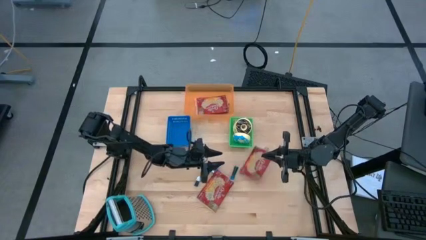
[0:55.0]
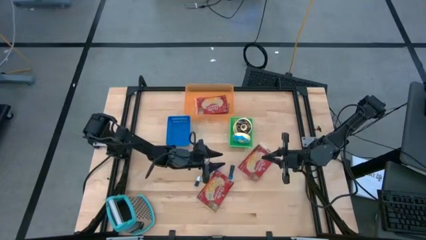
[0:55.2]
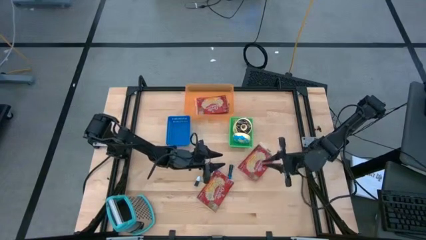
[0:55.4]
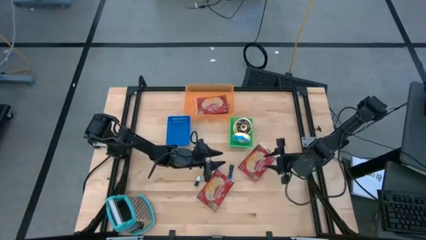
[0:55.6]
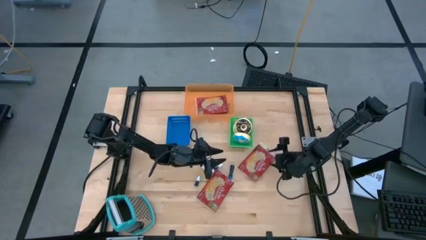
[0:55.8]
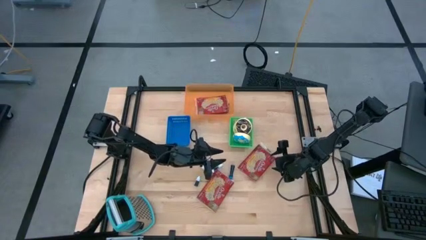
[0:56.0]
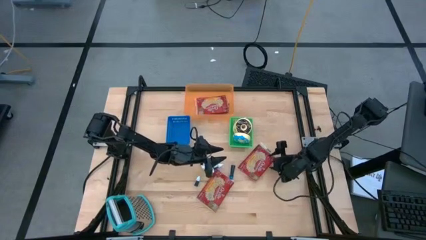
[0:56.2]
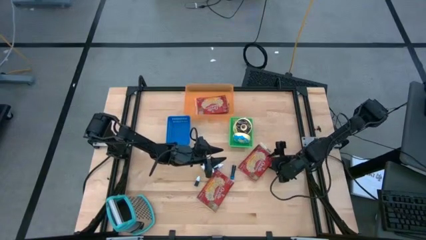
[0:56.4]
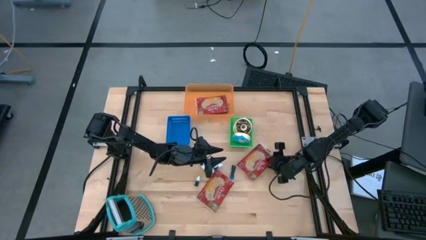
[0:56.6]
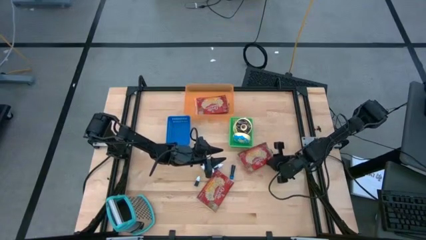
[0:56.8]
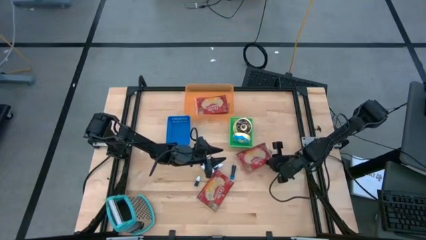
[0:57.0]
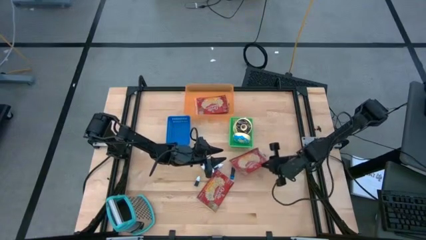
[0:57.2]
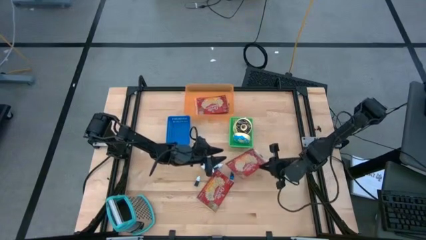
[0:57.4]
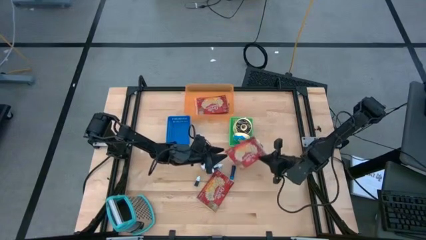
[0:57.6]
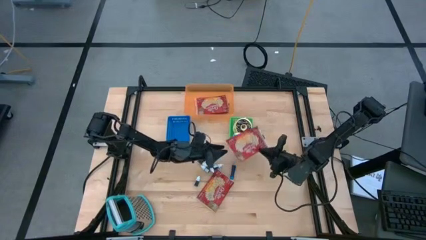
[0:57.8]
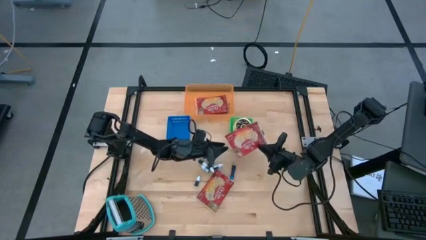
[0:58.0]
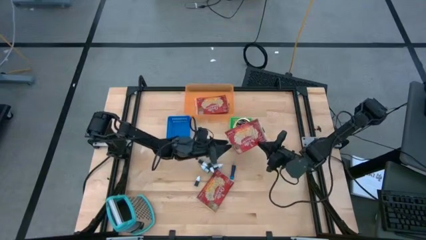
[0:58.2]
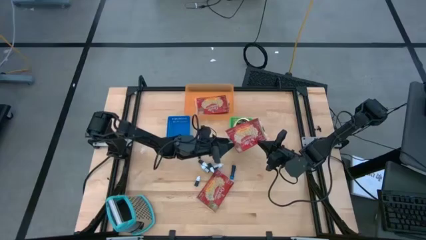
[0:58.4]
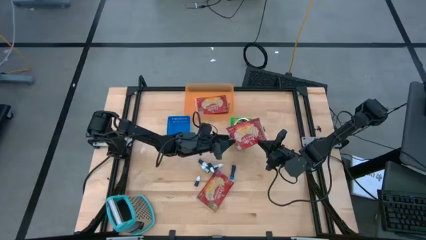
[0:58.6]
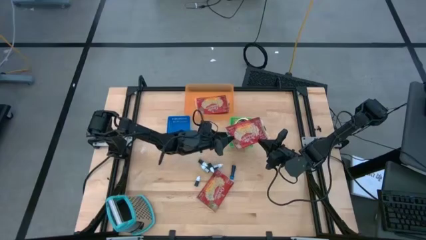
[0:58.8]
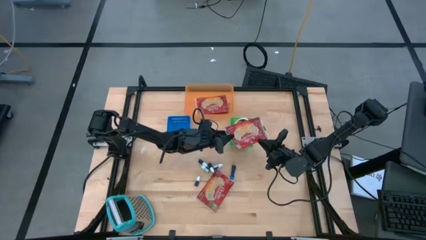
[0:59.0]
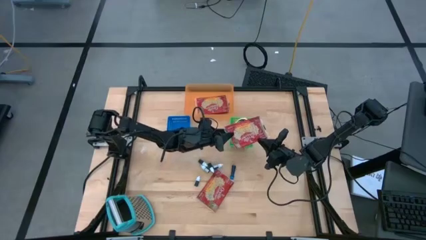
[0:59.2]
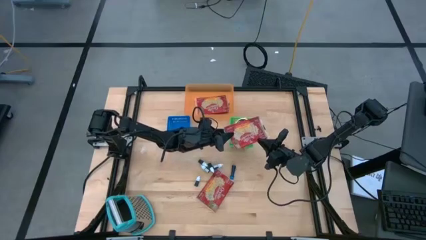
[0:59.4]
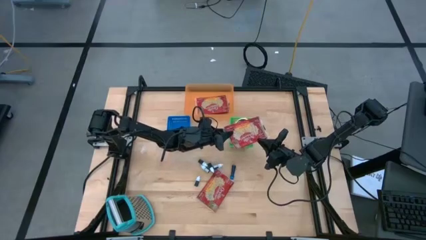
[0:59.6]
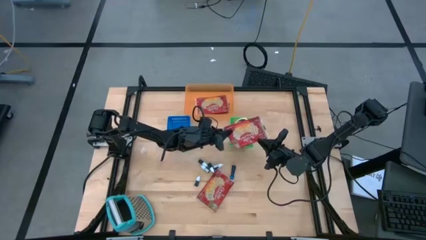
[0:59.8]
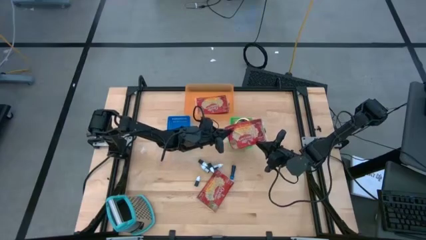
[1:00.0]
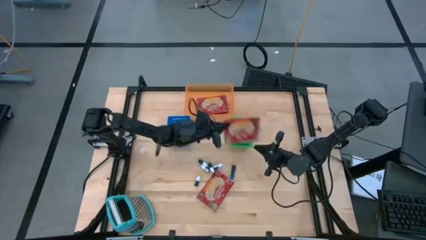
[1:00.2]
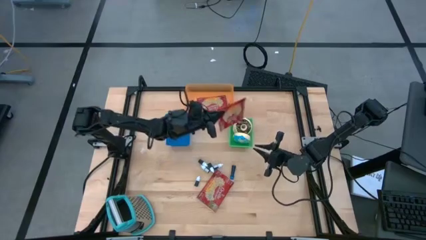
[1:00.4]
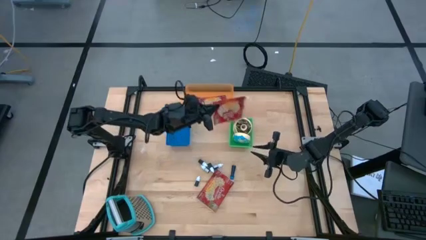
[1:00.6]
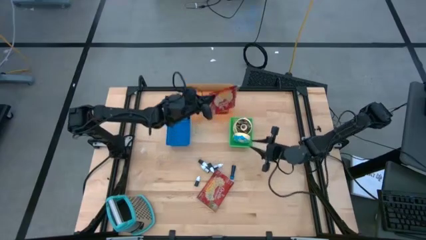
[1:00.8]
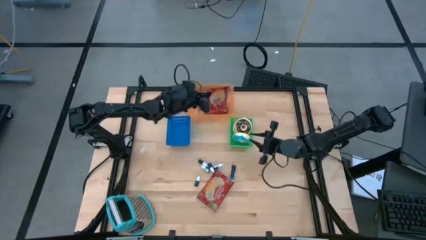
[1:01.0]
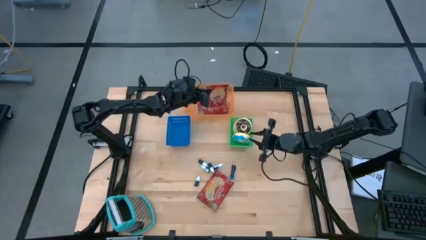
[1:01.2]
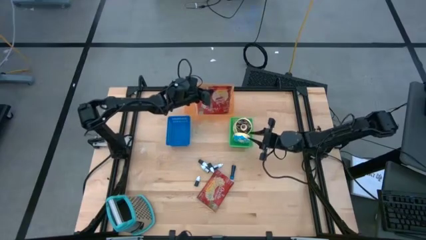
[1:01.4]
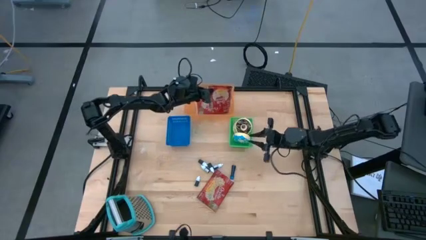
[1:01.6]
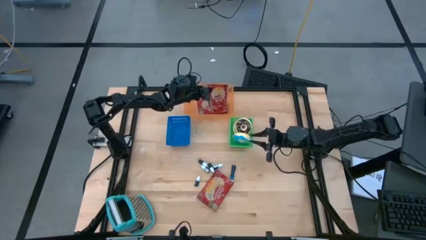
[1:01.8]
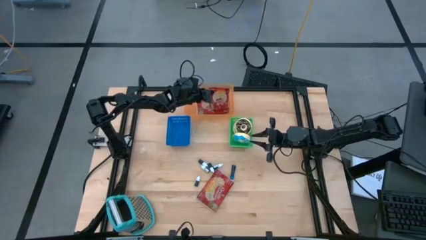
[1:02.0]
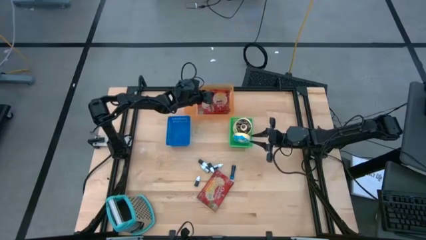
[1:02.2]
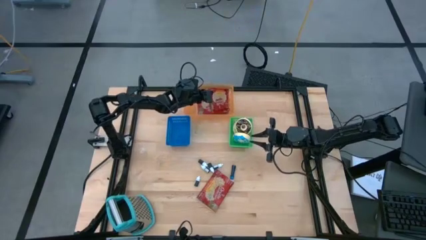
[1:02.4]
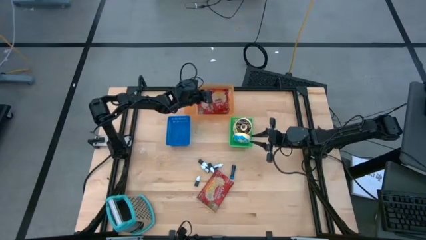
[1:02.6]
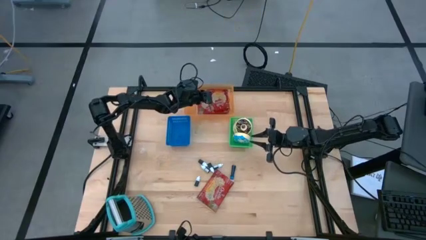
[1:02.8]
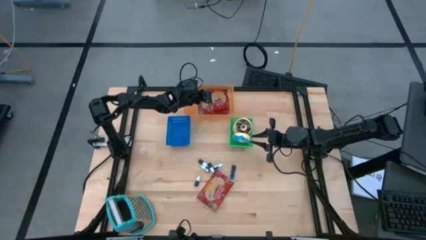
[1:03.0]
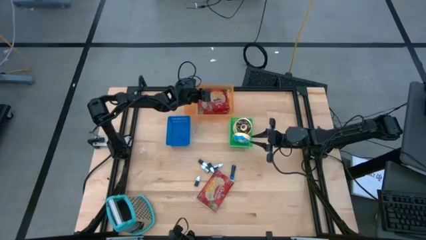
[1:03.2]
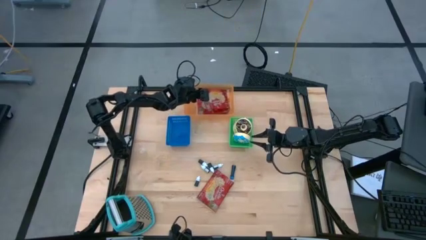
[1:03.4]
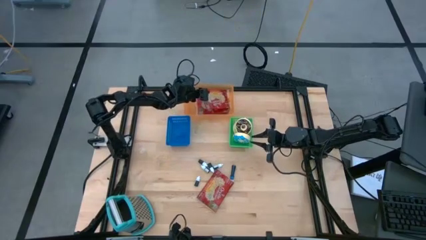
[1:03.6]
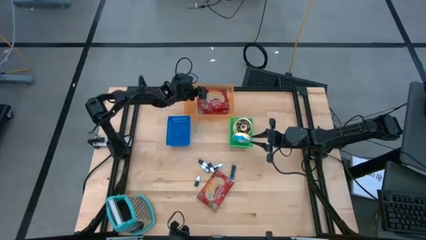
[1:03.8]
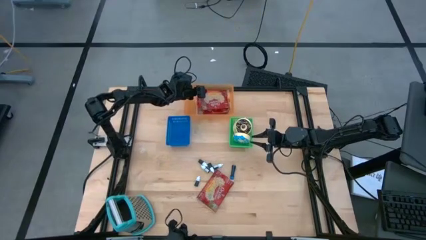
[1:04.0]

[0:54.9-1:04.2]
Put the right red popcorn bag into the orange bin

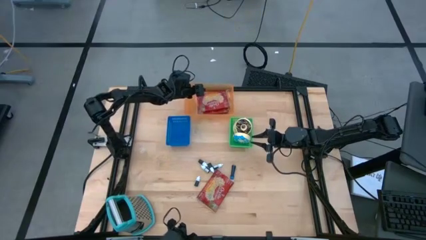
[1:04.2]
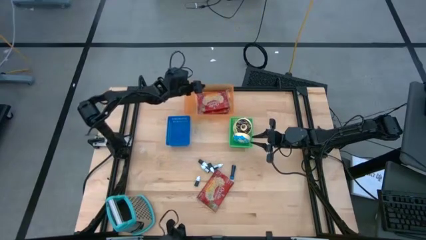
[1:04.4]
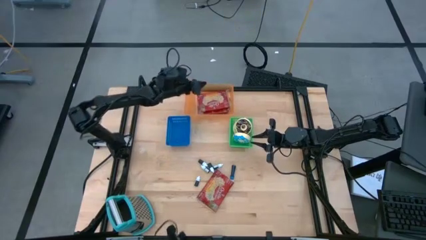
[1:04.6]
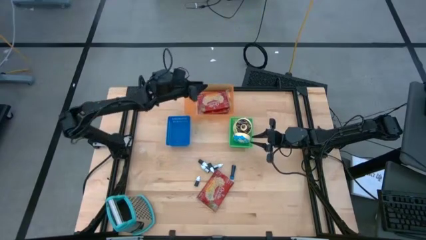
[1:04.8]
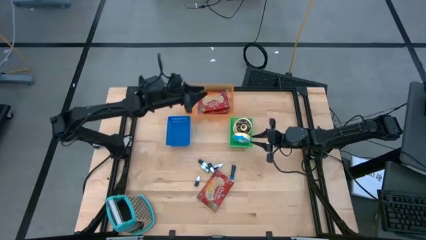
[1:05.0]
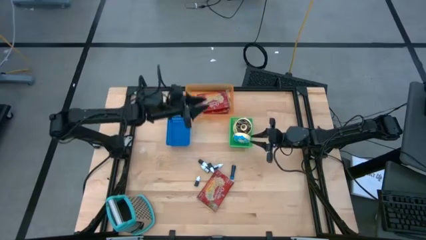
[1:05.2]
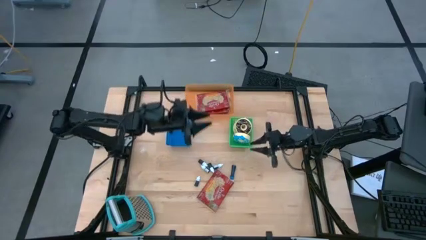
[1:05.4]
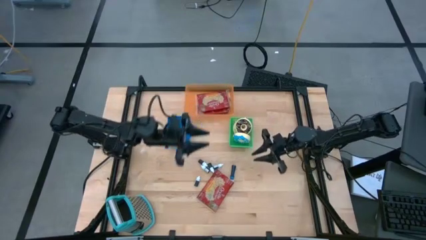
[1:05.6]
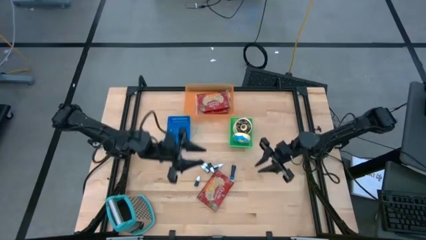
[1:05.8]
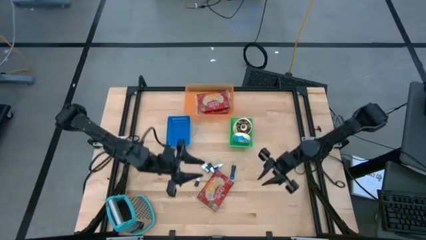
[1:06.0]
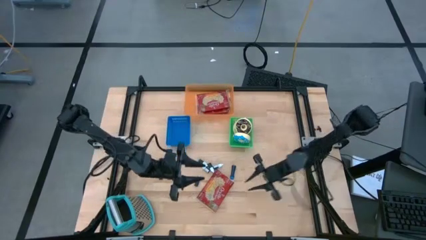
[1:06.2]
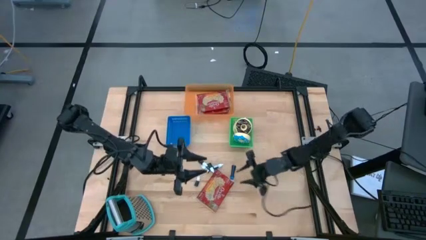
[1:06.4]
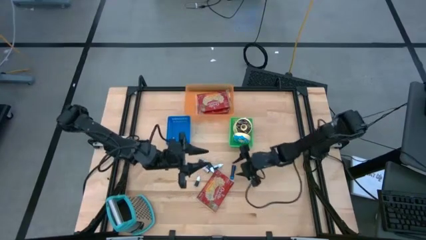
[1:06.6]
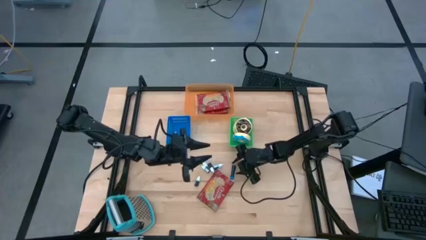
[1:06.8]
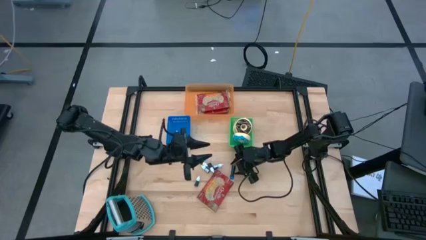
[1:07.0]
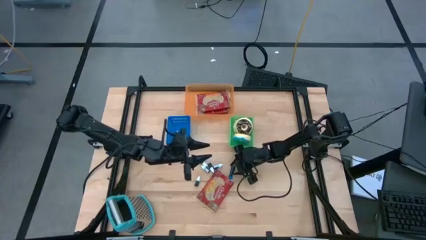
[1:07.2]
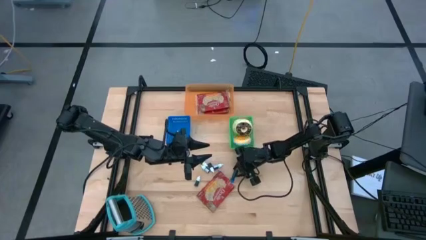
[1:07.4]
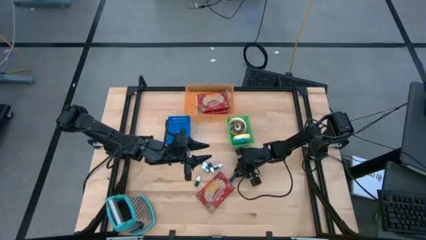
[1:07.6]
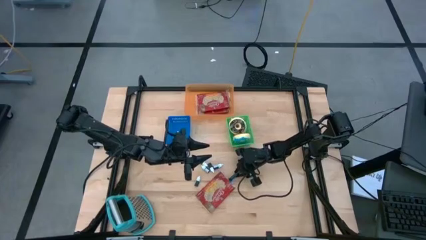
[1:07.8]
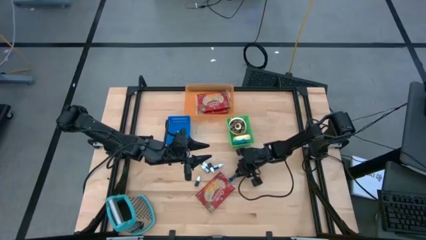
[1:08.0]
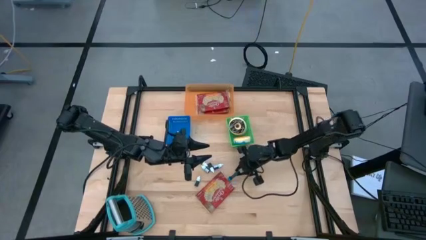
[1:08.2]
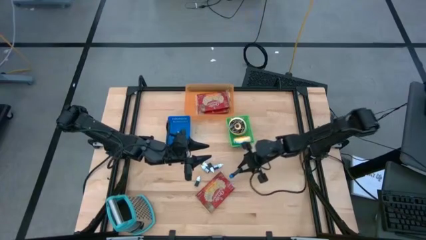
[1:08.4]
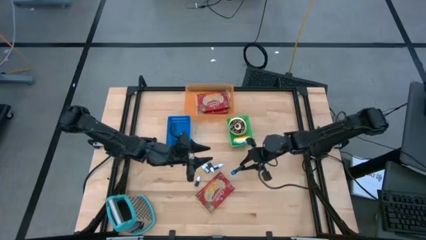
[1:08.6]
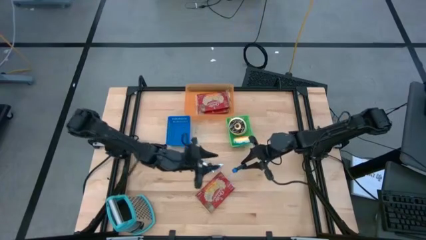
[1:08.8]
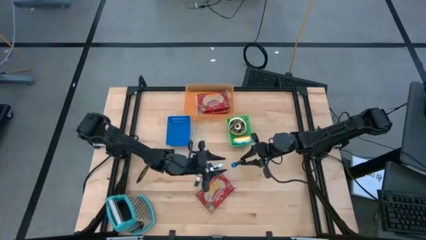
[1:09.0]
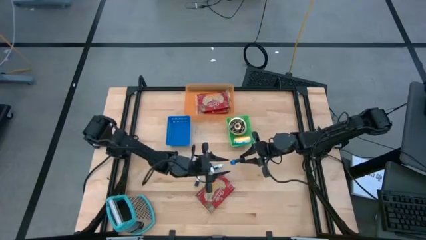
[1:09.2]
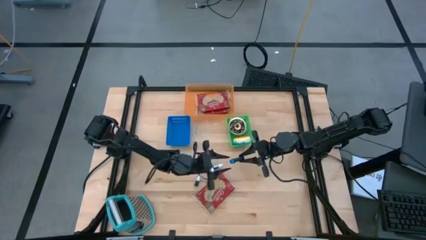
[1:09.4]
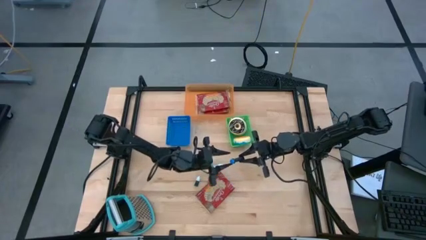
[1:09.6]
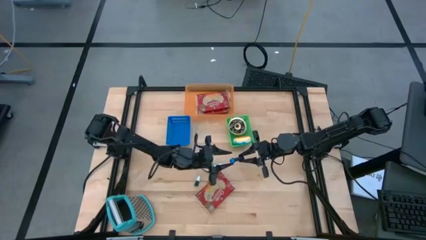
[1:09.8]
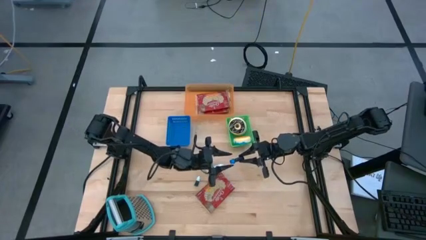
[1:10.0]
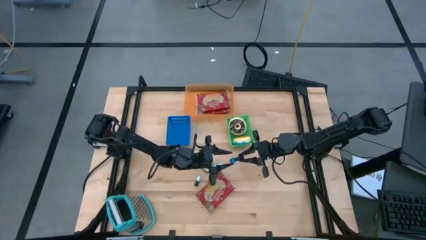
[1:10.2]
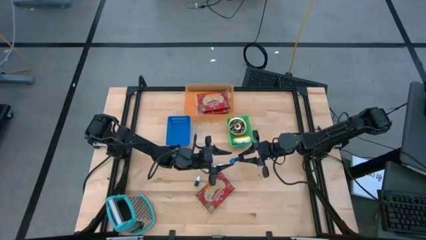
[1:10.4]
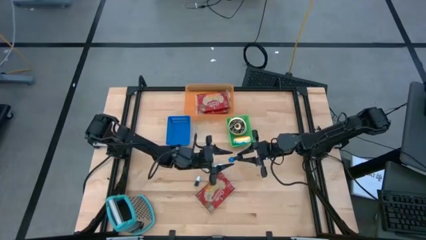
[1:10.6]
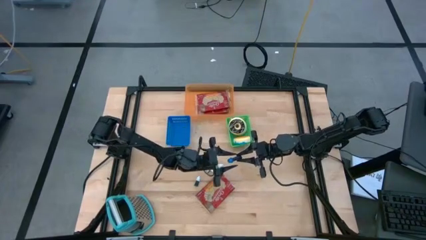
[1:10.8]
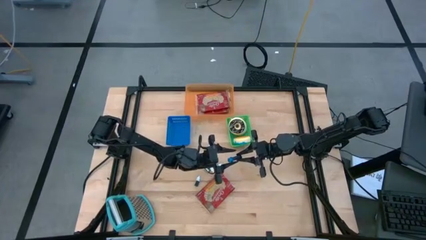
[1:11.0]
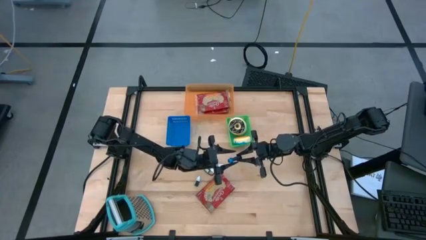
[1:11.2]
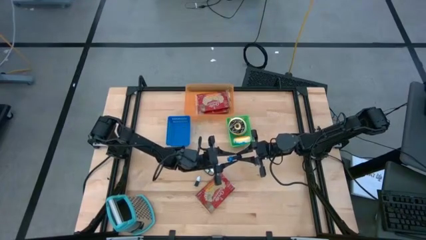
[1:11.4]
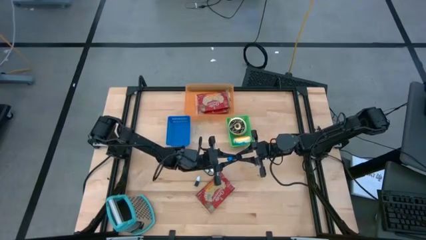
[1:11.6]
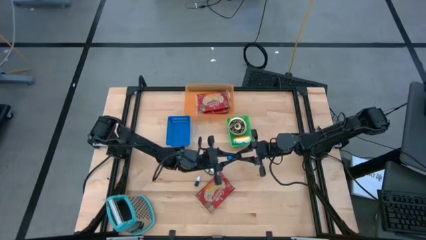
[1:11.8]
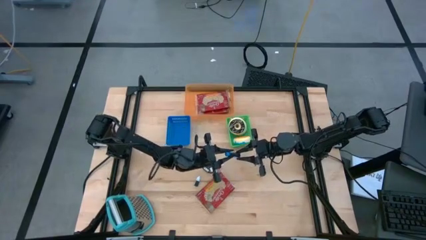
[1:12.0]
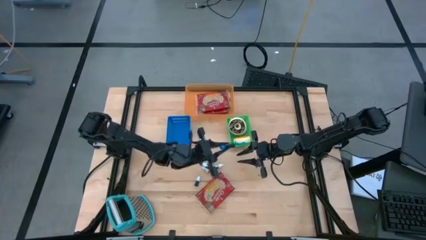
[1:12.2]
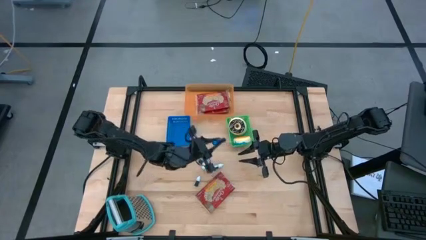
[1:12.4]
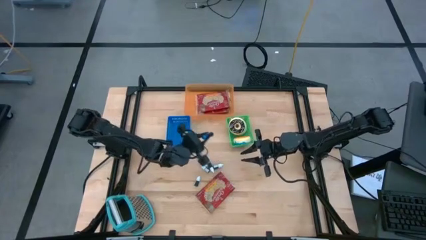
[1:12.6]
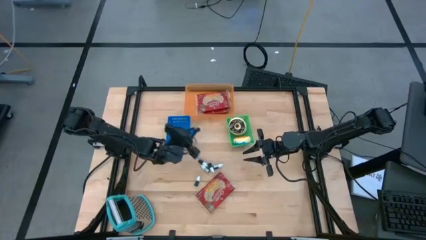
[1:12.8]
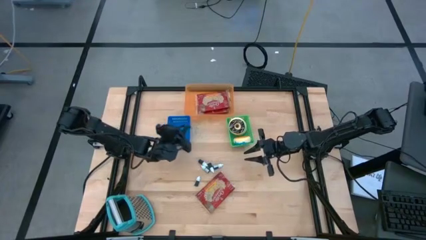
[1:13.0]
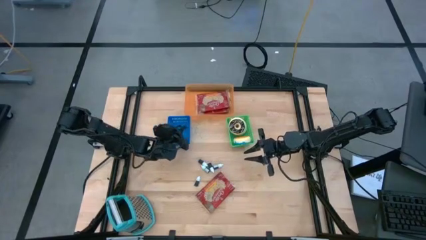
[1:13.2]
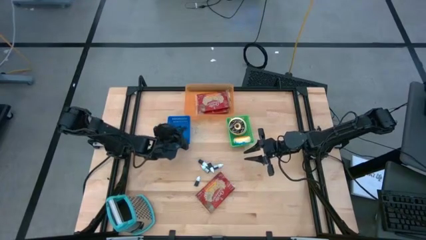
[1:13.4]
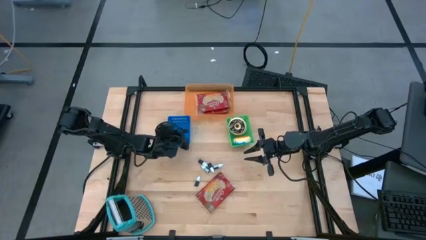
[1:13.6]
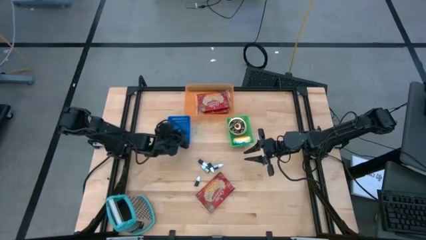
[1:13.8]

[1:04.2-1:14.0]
Put the blue food coloring bottle into the blue bin
